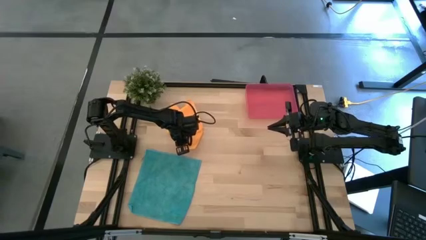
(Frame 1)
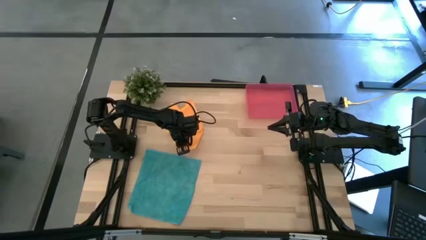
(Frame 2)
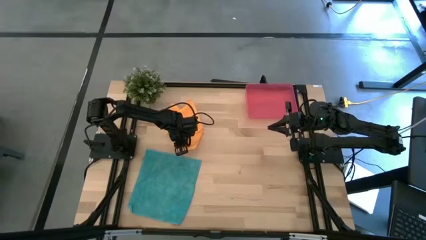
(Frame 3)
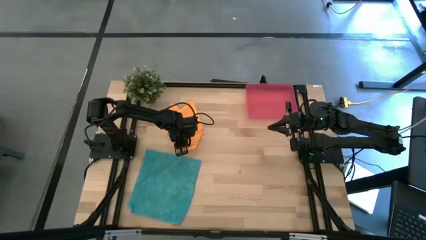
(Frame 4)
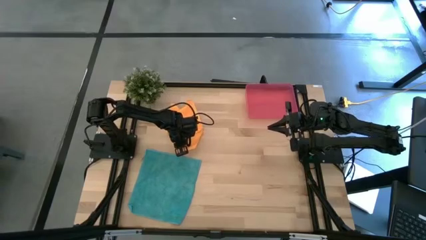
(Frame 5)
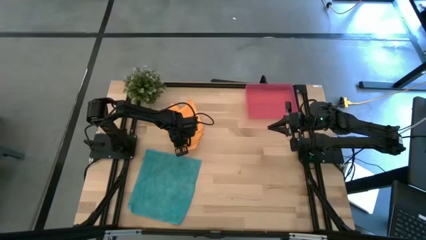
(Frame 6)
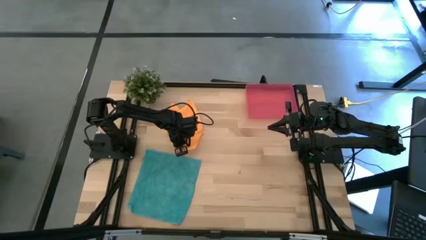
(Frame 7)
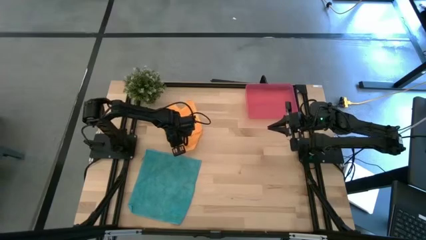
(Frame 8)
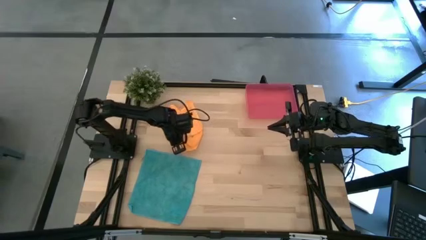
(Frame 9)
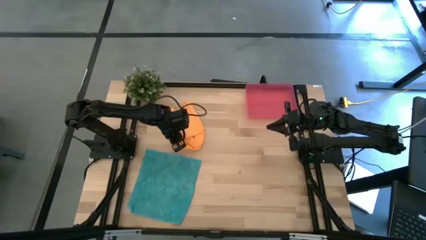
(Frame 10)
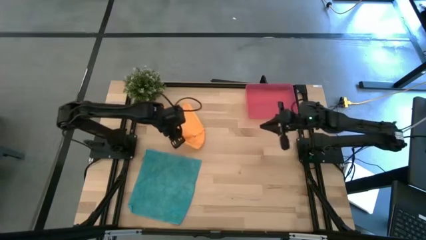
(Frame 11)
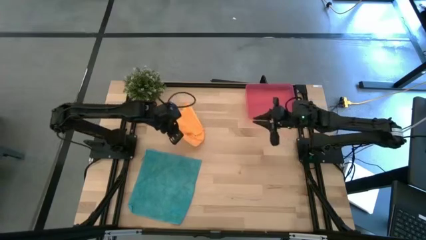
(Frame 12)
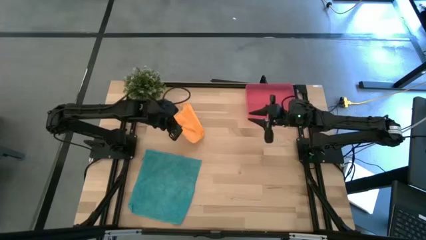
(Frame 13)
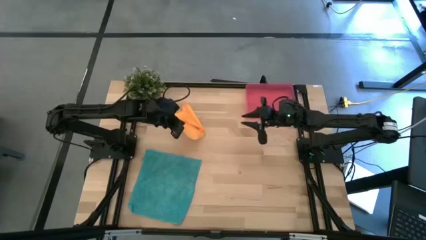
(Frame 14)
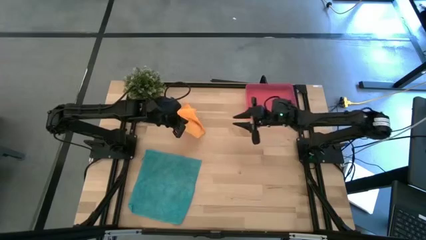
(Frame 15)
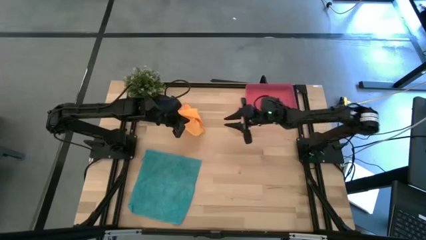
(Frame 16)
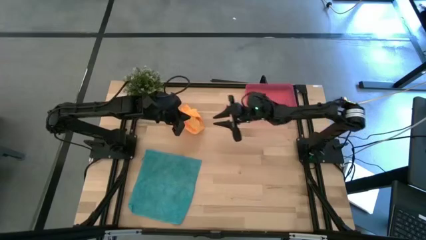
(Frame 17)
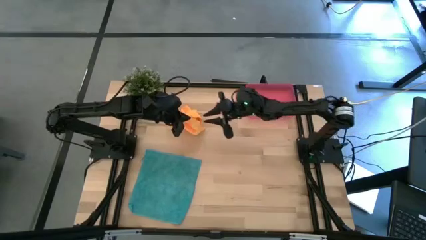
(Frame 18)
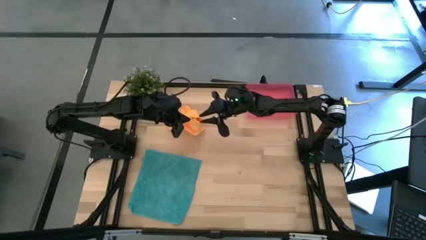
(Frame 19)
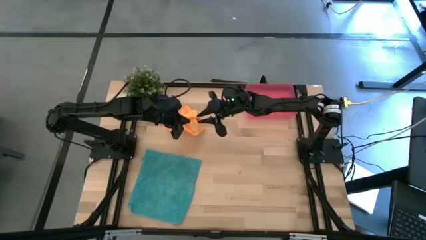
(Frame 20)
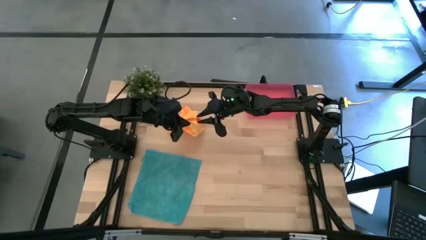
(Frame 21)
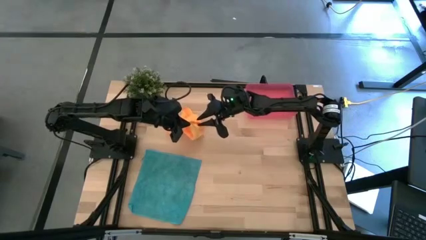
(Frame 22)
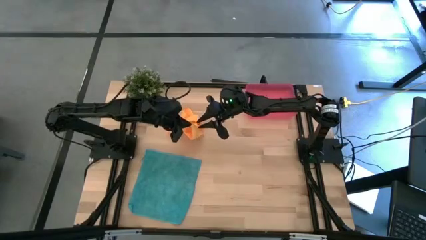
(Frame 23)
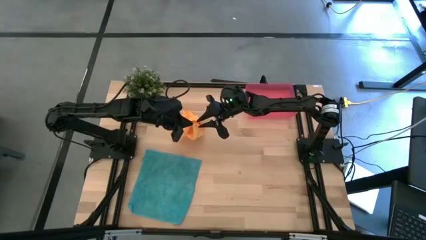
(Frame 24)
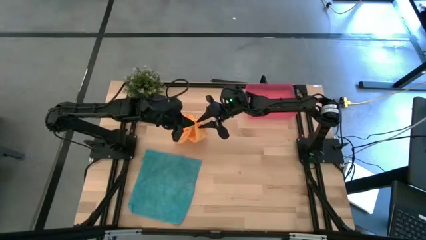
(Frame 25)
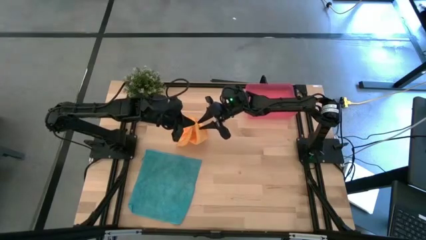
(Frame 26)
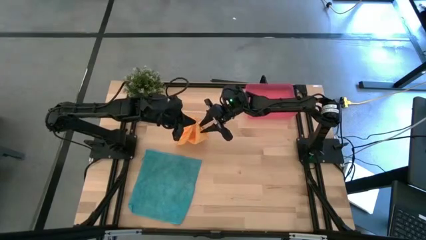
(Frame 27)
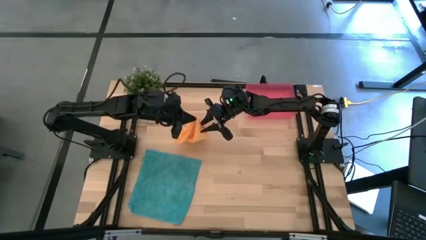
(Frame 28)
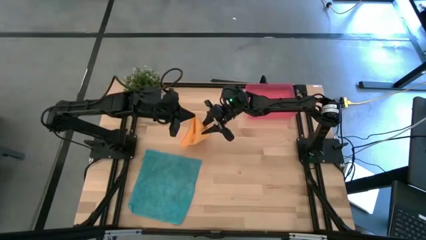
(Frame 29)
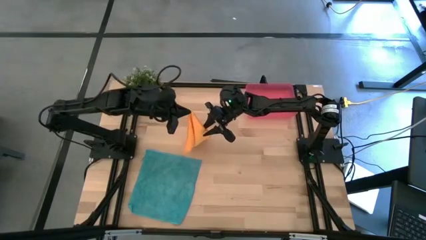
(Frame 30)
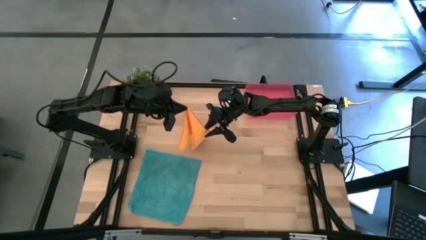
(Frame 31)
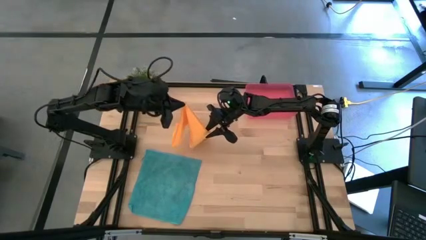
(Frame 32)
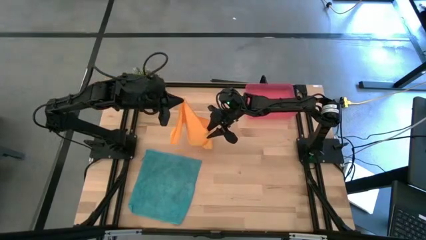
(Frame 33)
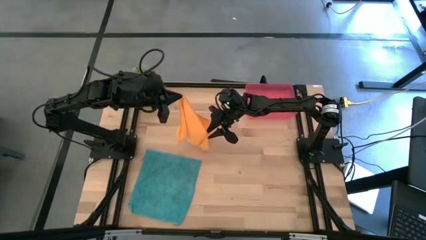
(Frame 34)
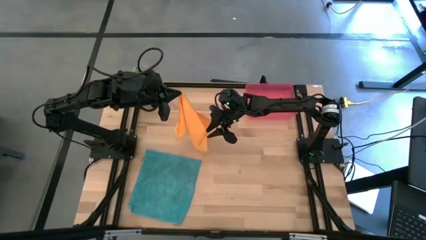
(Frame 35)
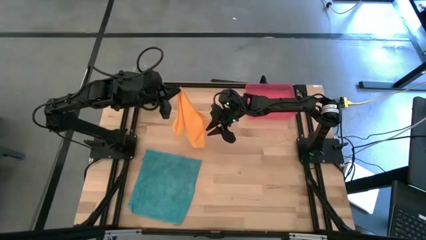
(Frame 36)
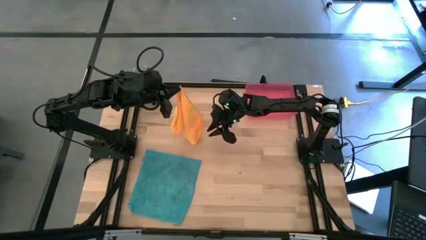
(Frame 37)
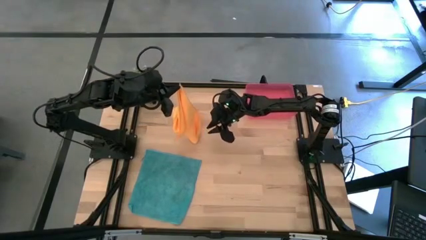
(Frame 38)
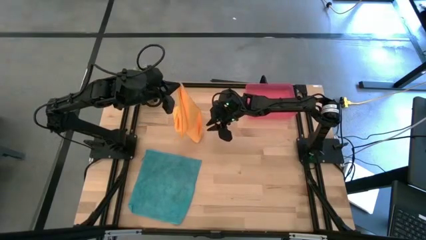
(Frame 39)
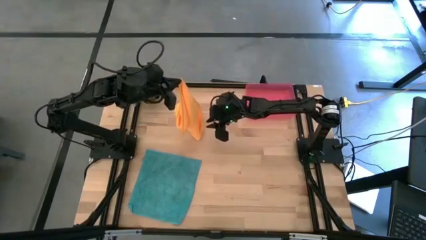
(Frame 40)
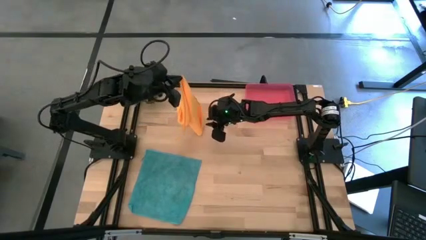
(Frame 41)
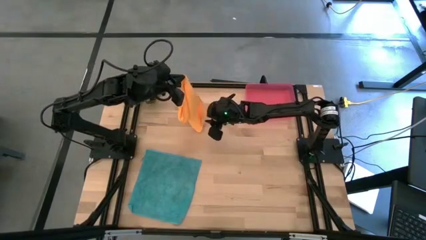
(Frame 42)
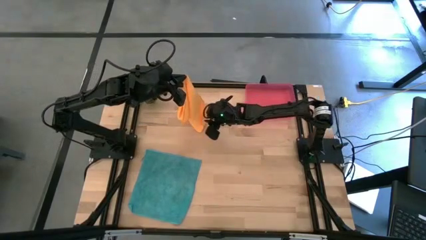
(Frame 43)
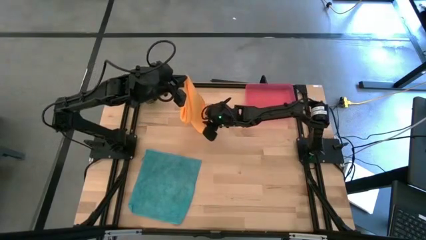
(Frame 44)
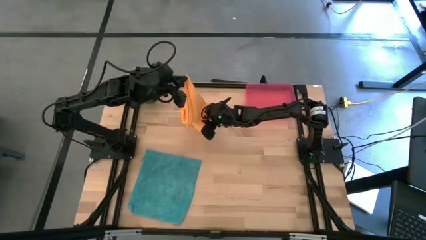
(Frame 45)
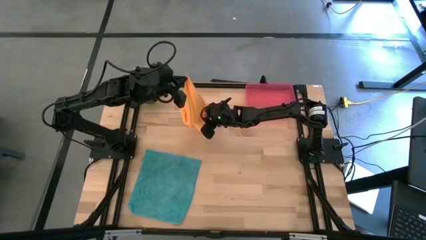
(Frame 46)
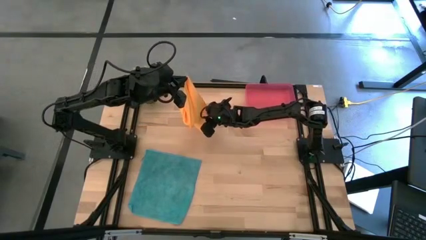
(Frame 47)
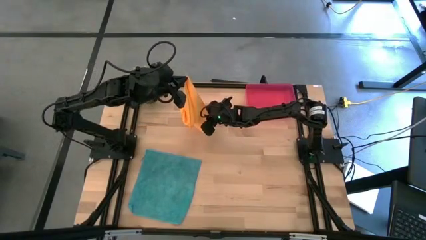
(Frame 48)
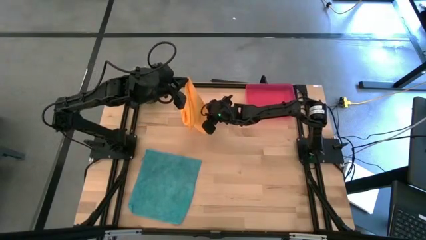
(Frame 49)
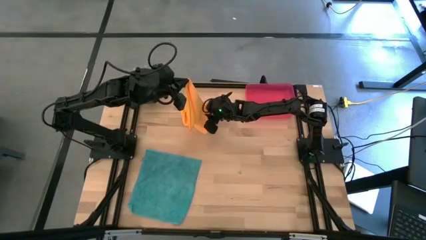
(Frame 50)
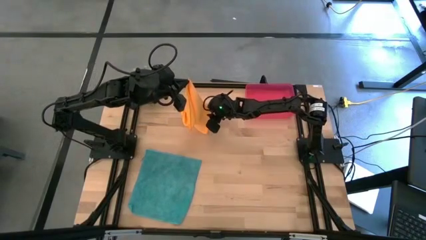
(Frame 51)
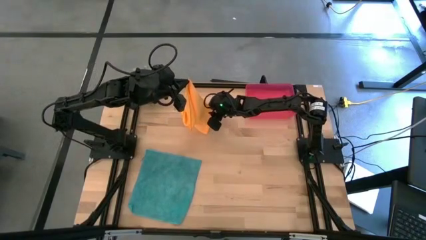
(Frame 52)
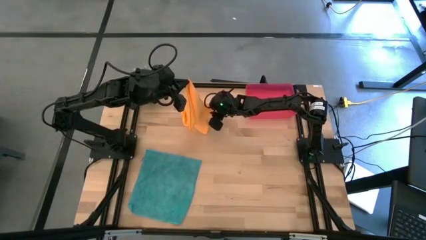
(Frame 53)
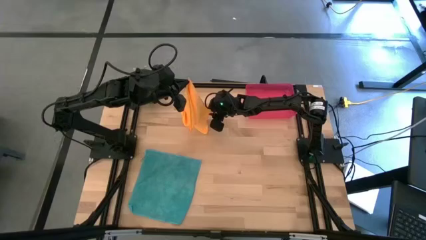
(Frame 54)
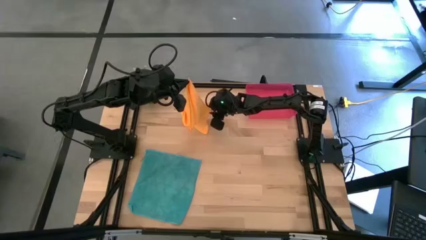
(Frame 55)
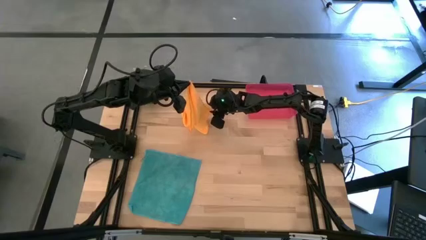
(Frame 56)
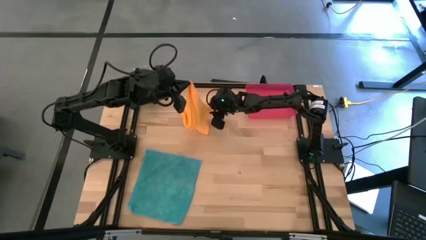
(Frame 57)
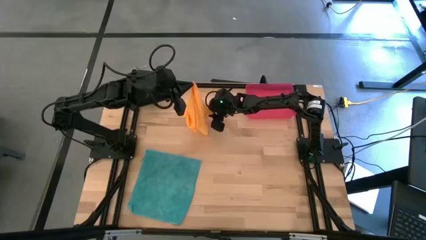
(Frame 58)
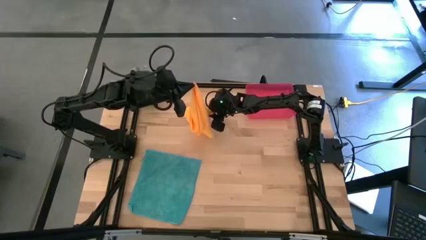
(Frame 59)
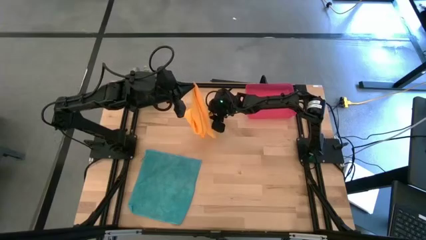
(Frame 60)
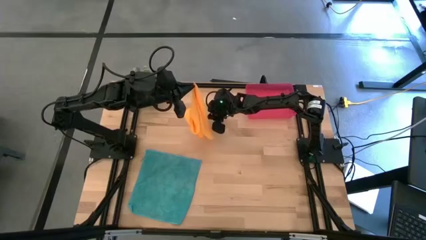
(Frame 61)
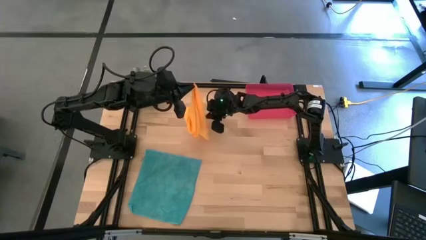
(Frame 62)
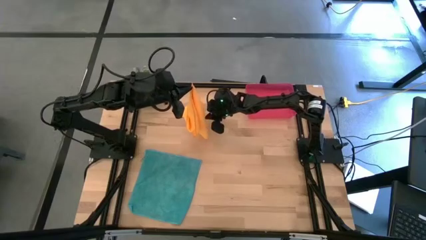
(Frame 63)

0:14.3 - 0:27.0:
Task: Roll microfiber towels into tight, uniform cylinder then place into a basket
Fold the orange microfiber towel
